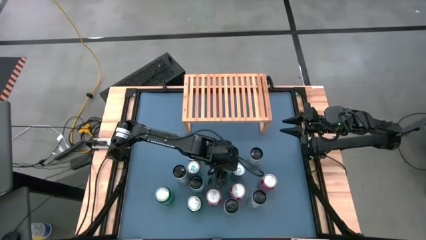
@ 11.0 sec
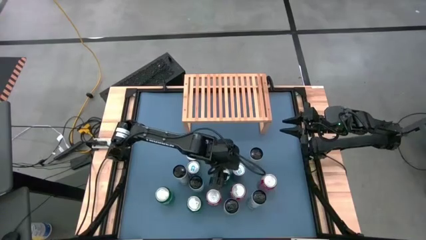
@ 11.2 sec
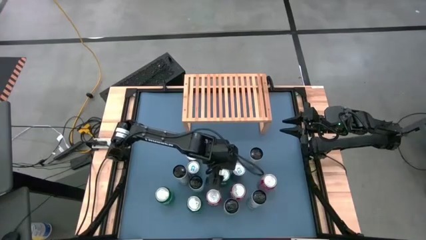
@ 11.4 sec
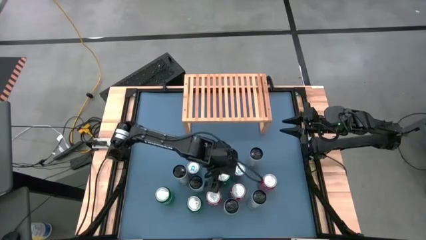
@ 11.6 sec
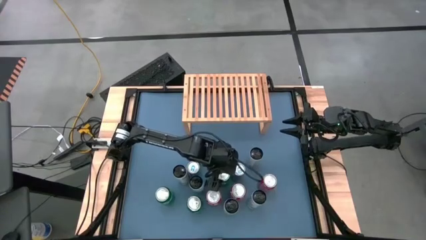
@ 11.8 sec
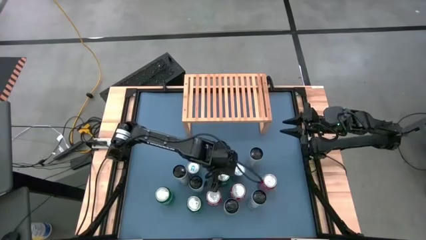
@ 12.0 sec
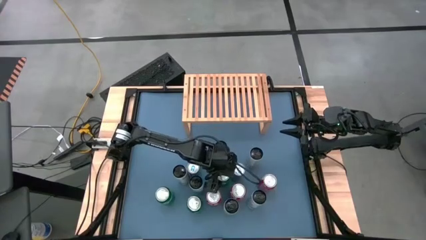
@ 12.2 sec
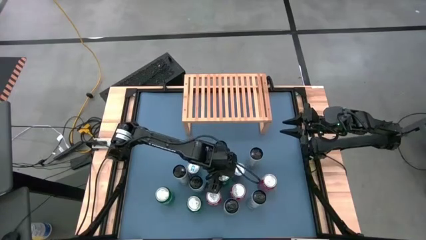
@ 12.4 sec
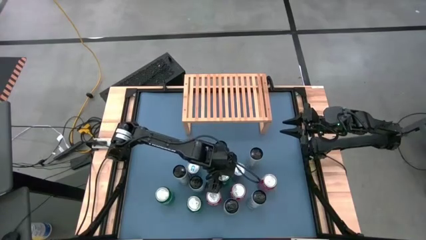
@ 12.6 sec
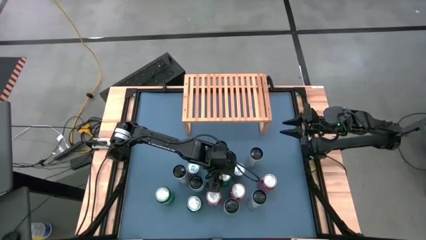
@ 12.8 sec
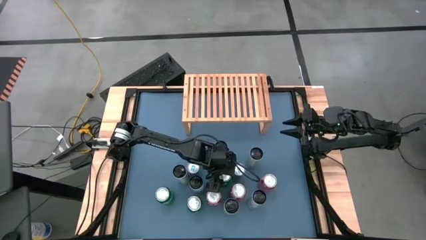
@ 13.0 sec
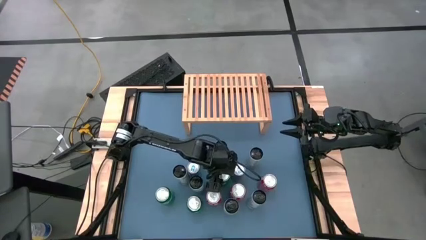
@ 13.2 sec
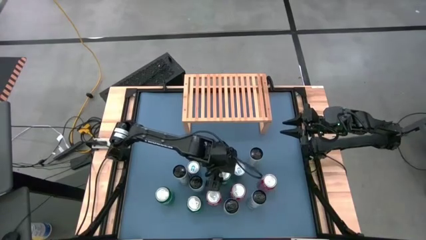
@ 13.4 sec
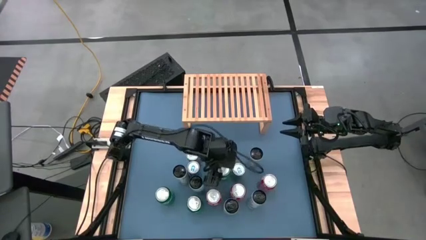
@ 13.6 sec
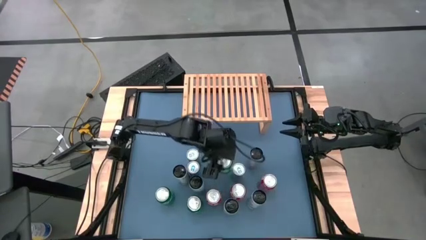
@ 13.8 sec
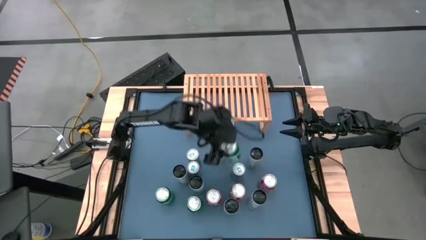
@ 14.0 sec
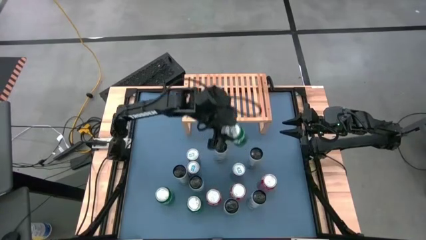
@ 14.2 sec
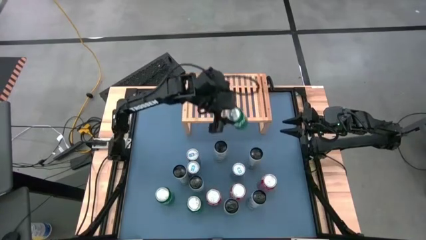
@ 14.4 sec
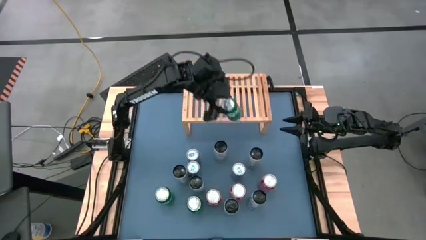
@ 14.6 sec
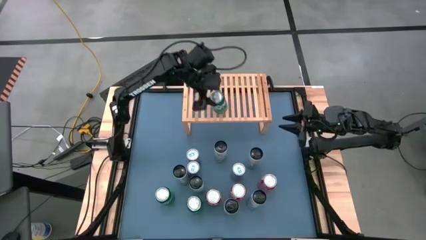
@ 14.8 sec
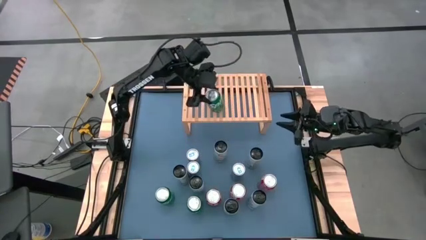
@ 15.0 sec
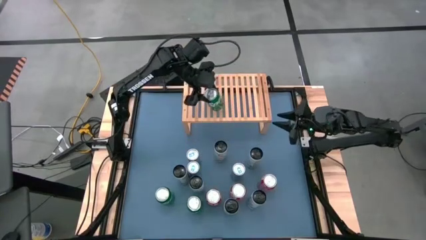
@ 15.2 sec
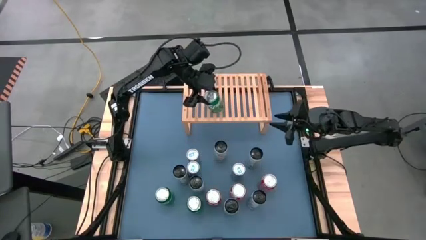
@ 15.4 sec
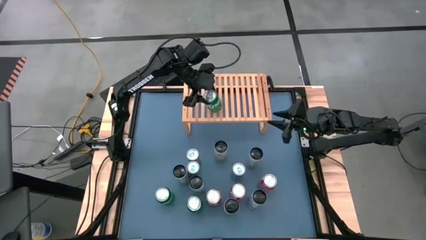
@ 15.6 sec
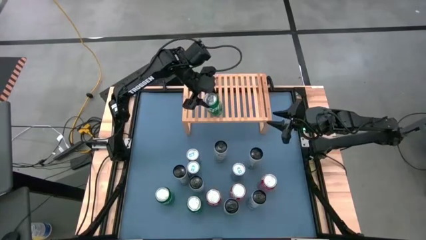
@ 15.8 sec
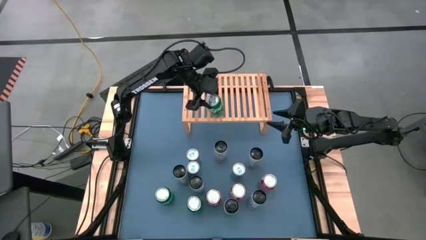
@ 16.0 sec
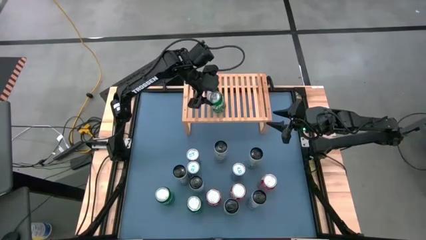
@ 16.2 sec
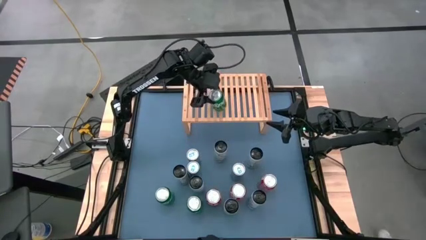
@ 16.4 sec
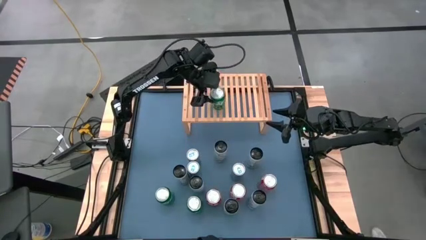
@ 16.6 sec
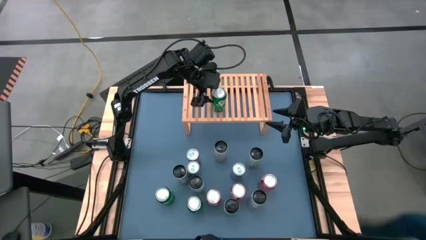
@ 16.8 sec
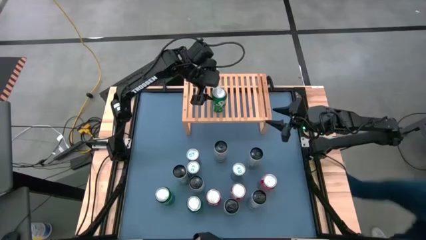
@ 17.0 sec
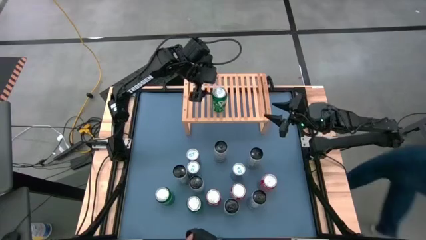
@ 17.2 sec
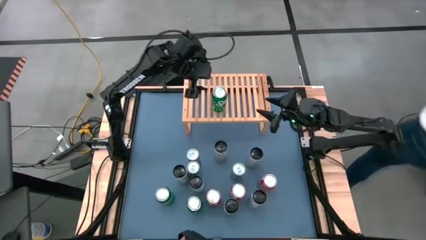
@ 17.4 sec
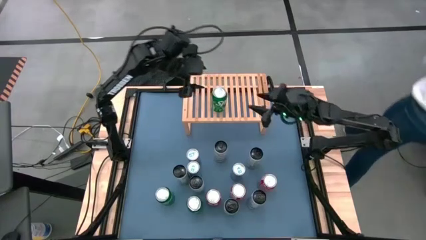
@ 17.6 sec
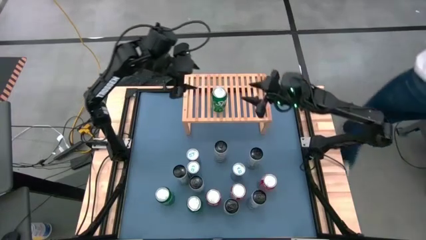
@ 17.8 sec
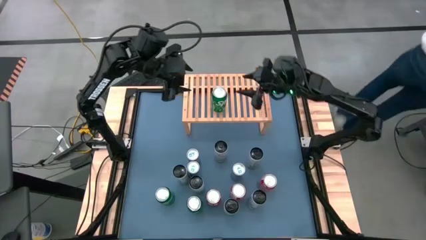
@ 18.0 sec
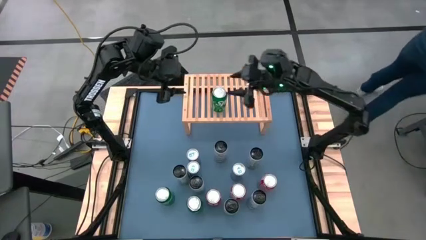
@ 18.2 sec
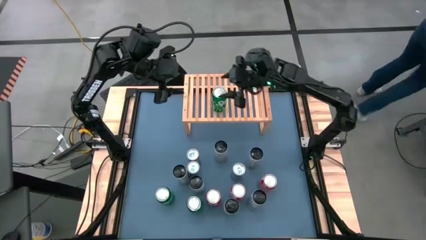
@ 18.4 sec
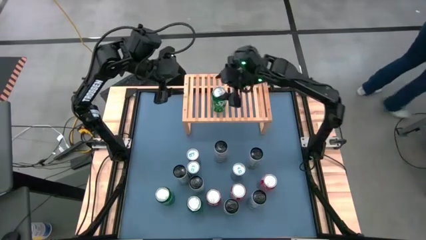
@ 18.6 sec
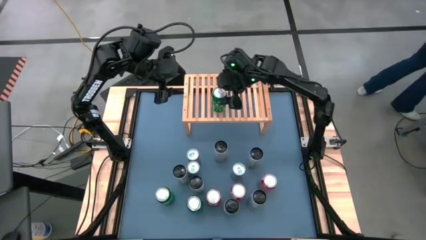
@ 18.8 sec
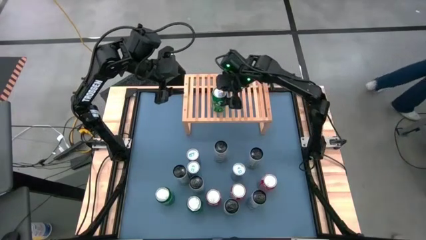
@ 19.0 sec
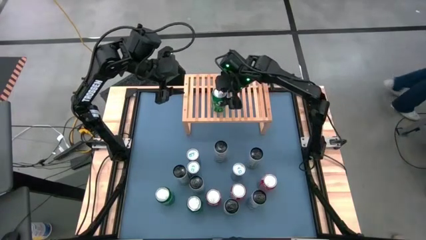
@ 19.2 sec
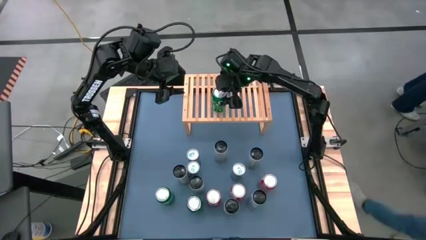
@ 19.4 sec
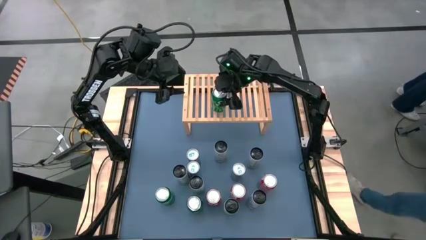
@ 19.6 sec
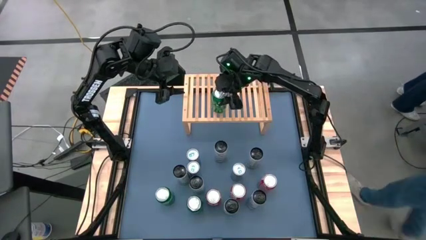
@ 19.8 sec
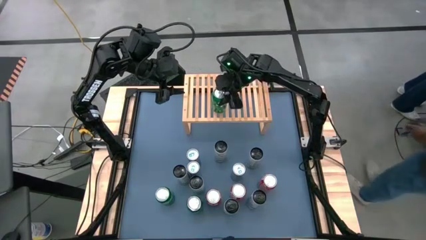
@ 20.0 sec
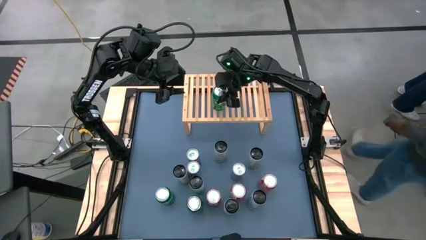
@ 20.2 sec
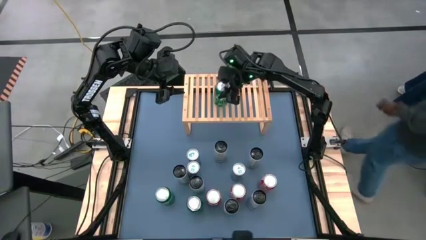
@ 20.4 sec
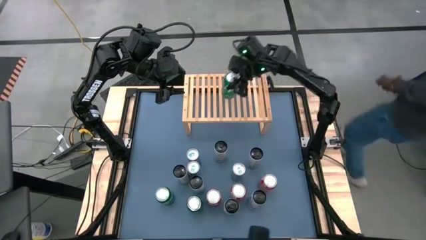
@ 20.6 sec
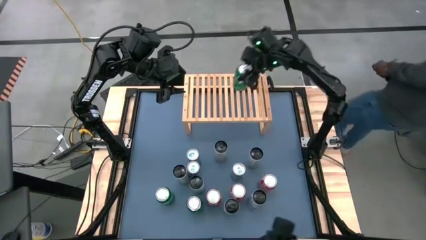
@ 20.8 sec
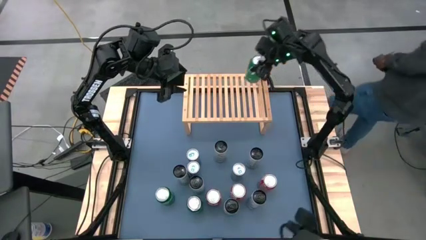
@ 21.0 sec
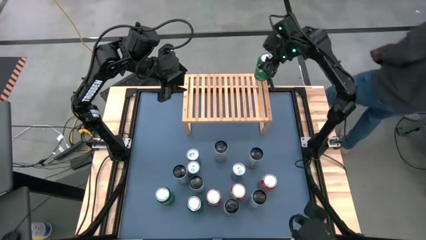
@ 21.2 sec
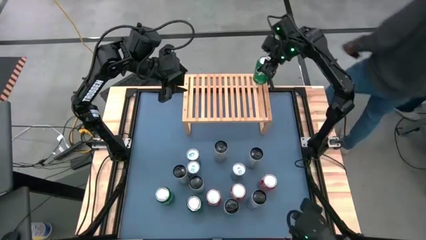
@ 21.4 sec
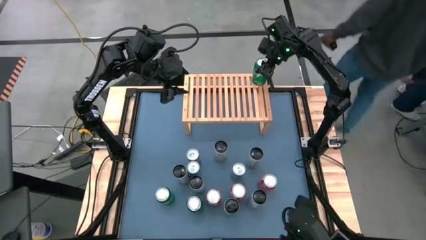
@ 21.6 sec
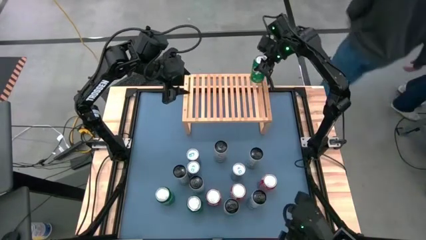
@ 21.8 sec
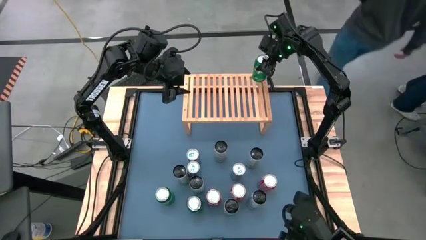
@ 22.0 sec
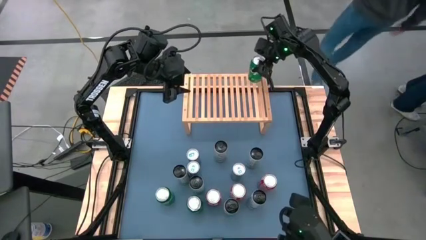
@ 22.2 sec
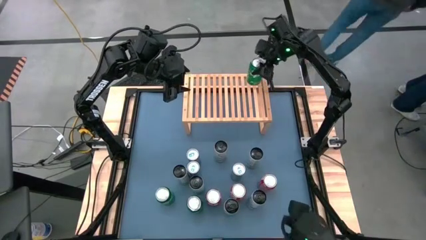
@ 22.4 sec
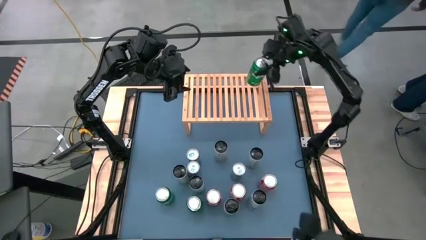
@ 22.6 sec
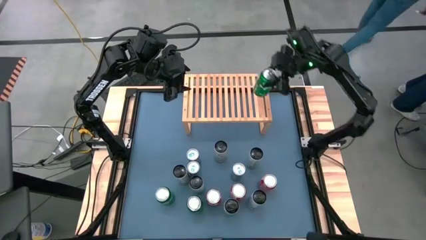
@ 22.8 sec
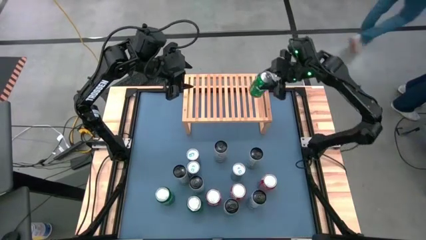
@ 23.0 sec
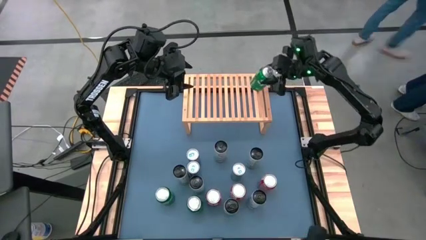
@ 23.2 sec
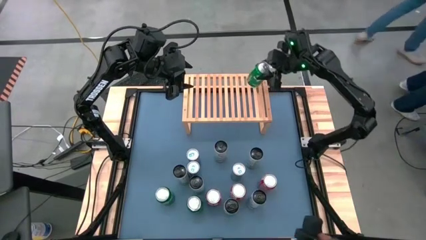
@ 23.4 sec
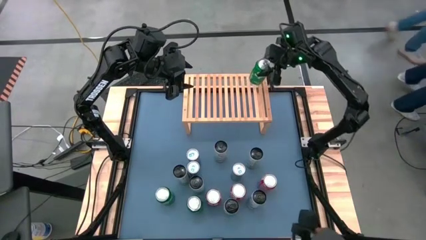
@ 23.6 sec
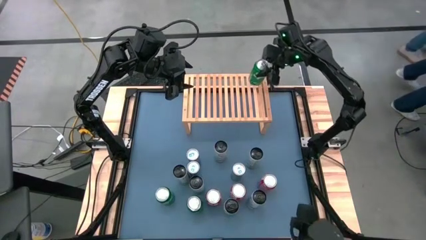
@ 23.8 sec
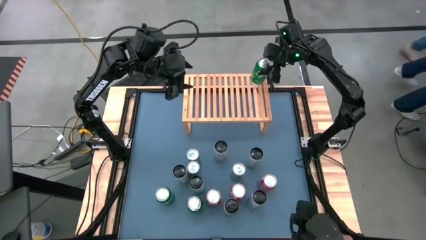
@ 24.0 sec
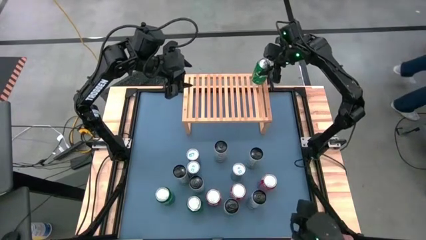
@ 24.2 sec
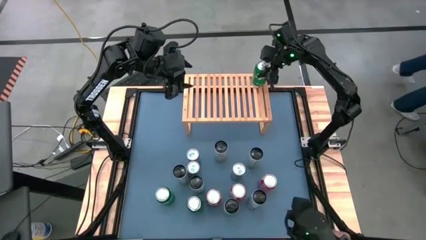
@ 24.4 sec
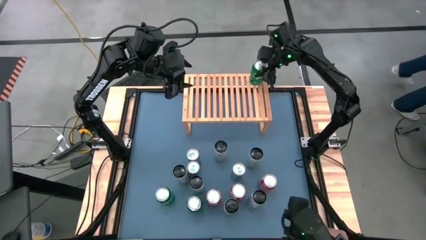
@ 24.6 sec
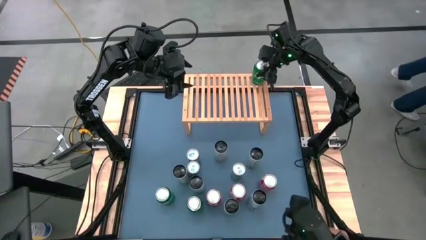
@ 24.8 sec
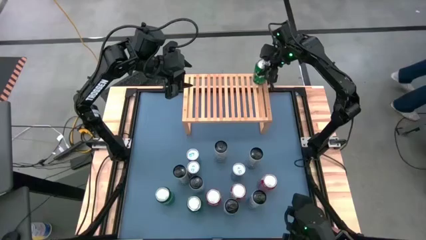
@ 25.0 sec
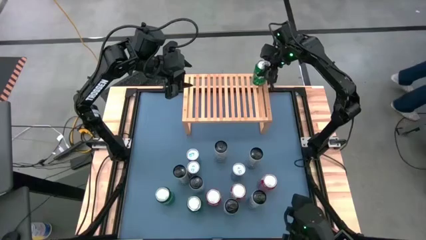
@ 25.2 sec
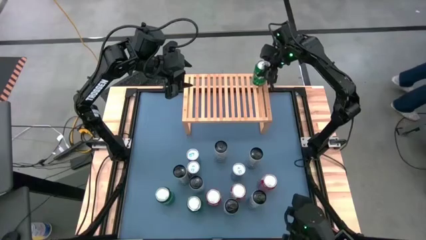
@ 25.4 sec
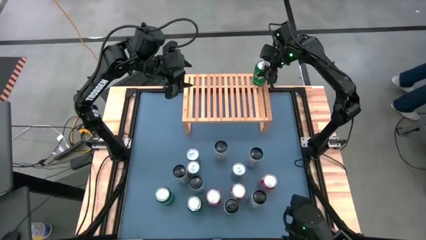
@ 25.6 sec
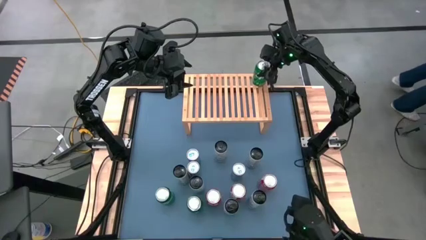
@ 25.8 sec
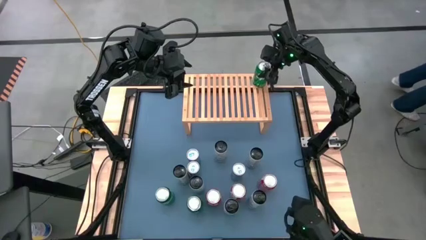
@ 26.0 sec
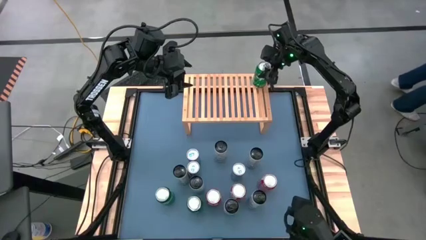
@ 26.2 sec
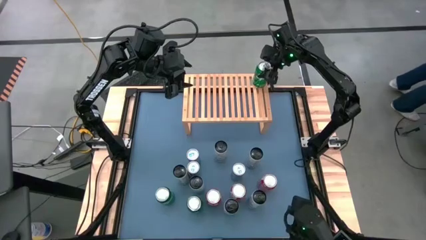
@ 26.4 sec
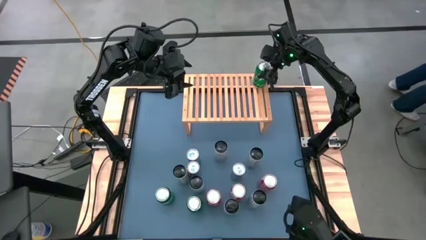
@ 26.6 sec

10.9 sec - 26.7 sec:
Task: Place canned beverage on shelf
Put the top green soda can on the shelf
